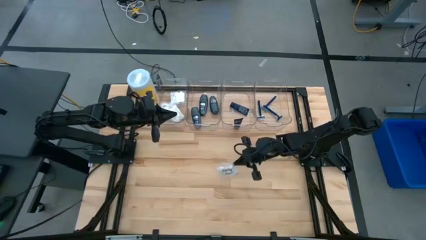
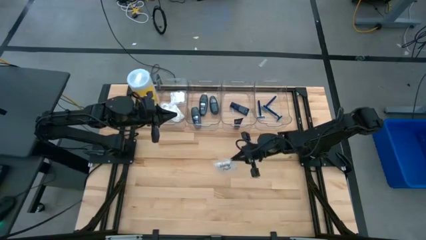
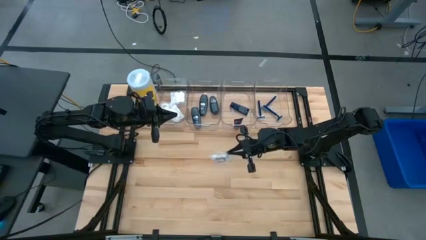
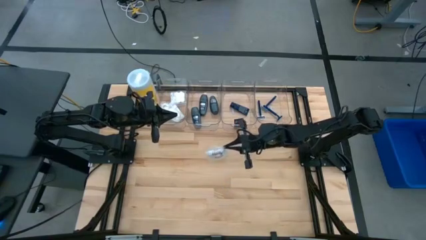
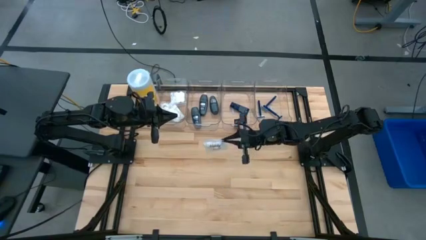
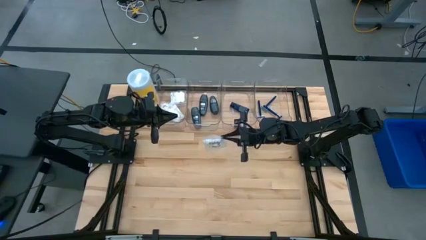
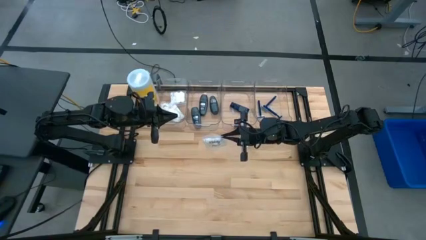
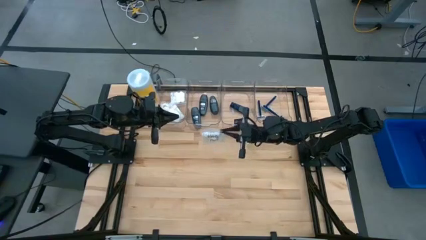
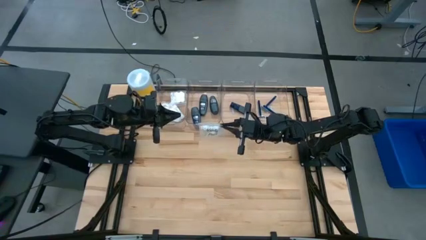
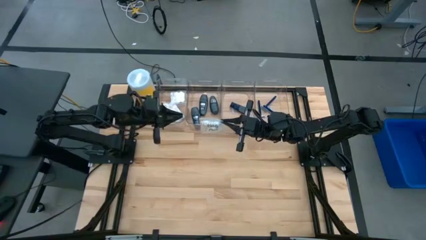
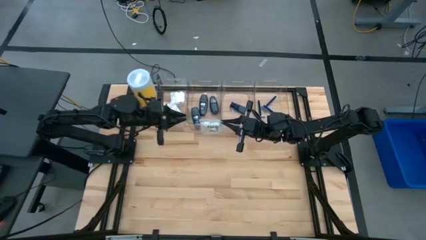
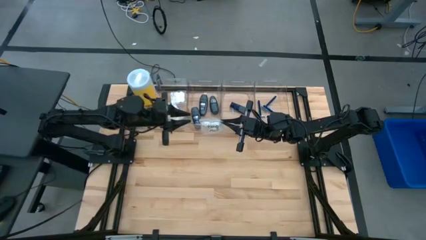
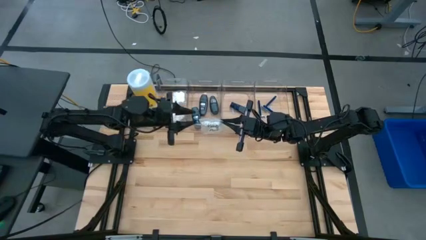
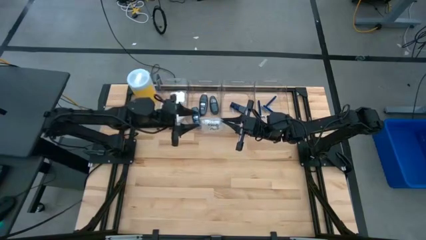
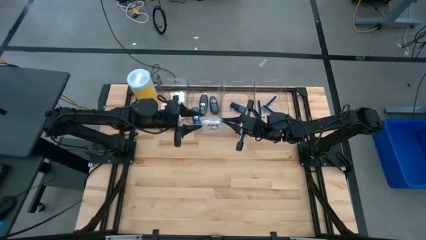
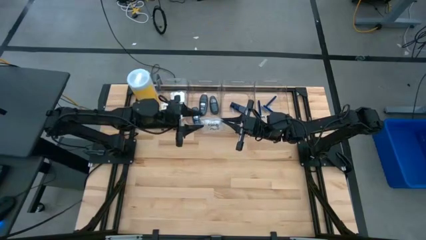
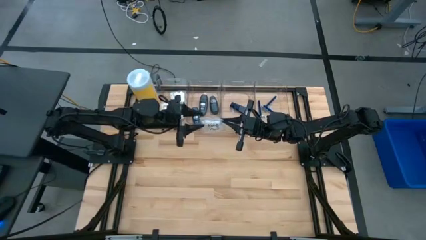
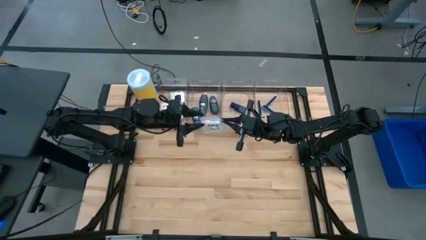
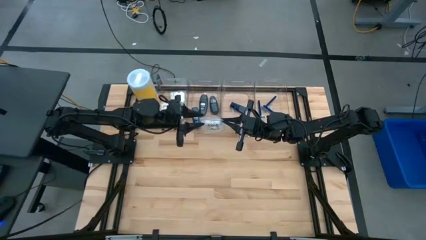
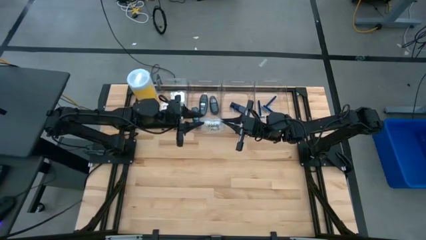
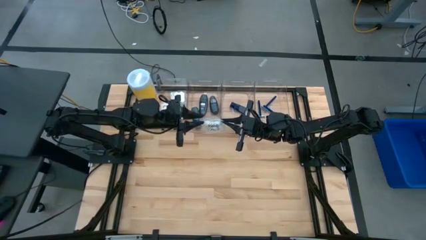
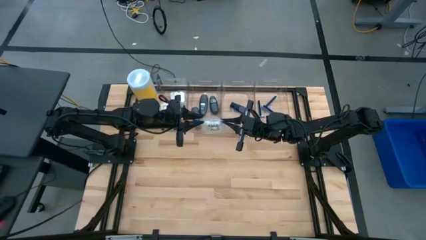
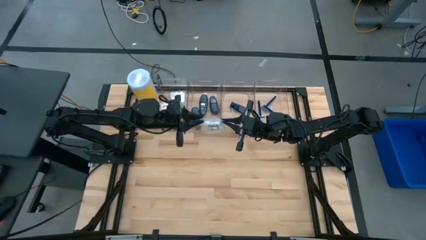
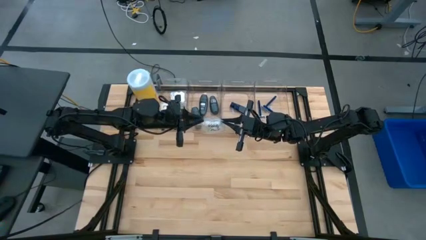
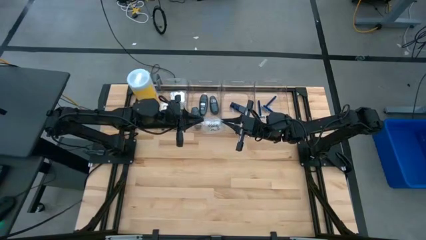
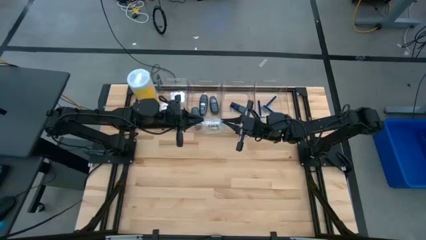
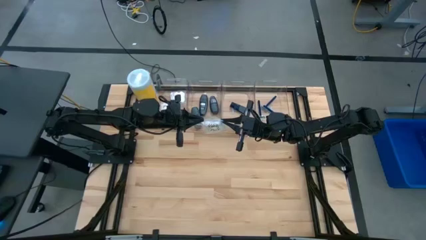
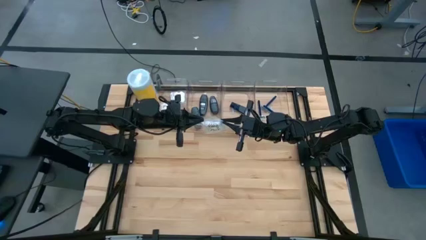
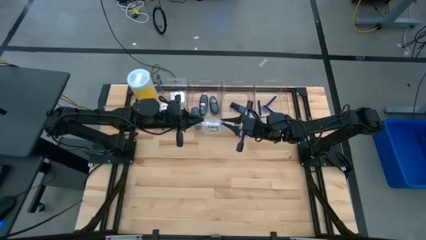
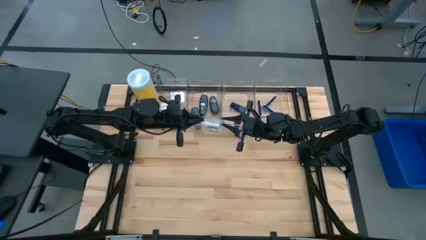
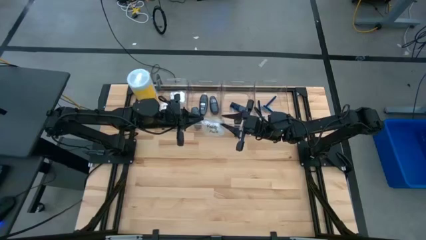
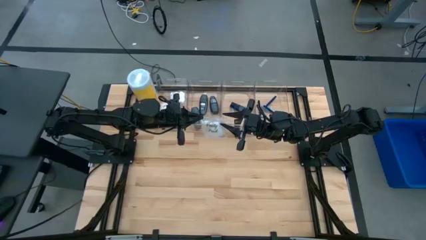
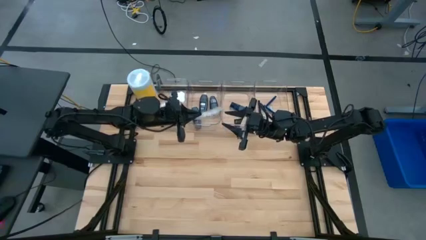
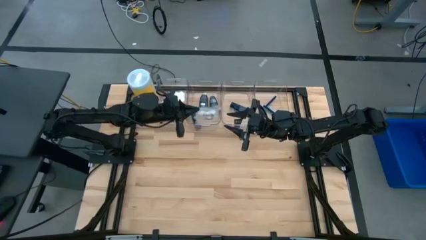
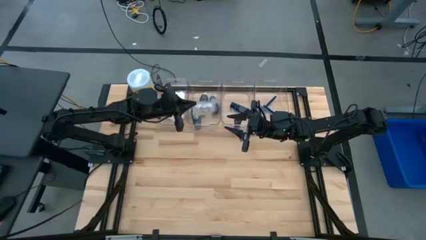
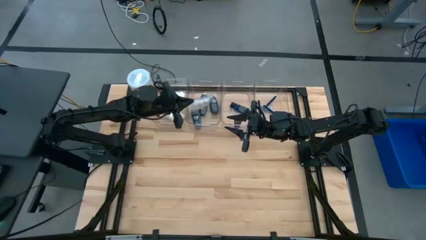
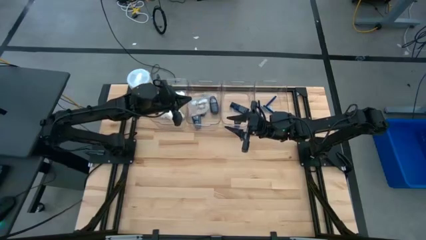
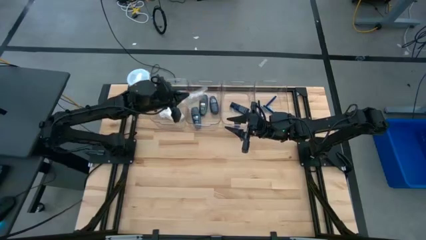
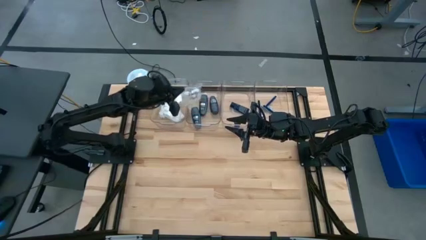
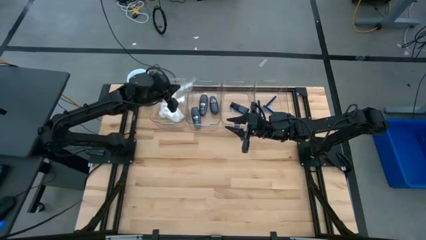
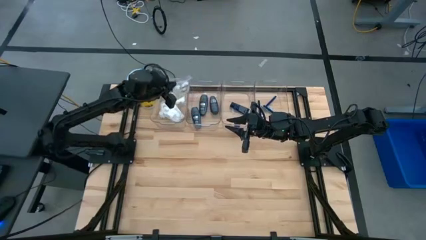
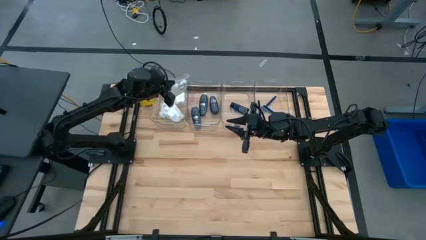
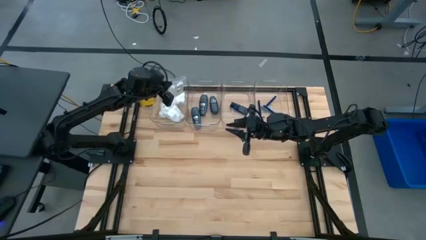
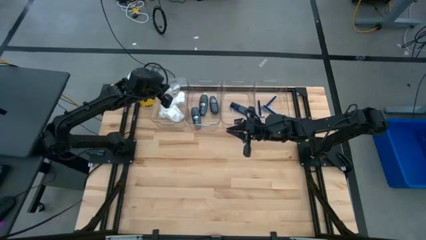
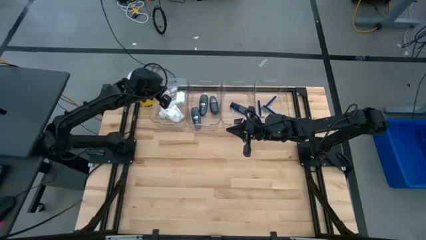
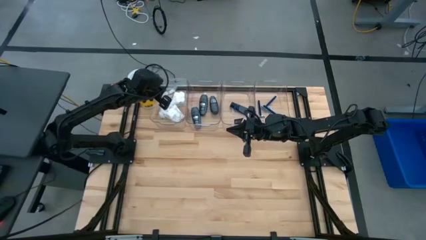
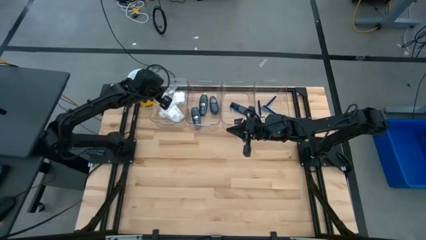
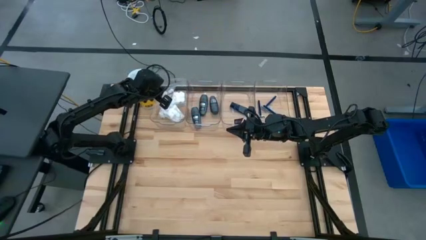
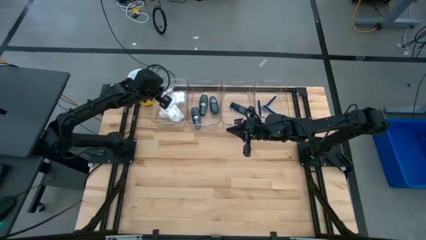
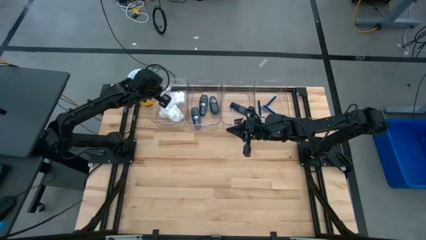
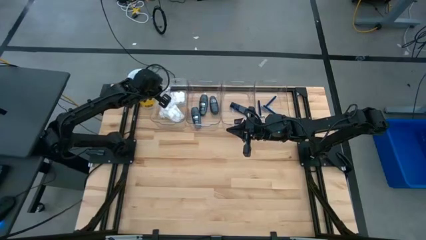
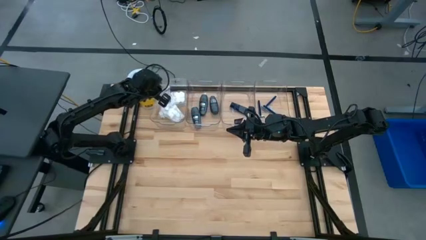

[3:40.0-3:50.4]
Task: Pick & Place Travel size toiletries
Put the white cotton pack into the left transparent bin

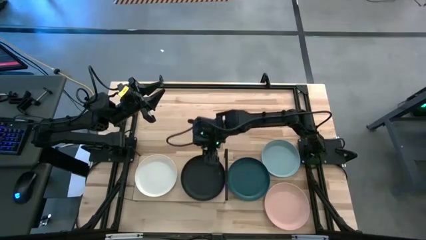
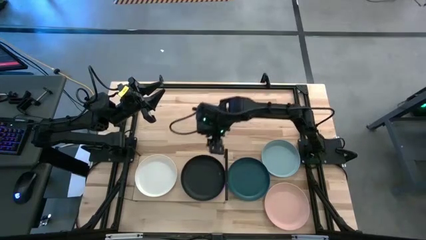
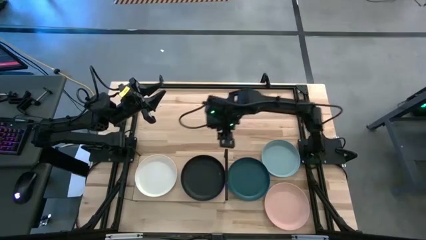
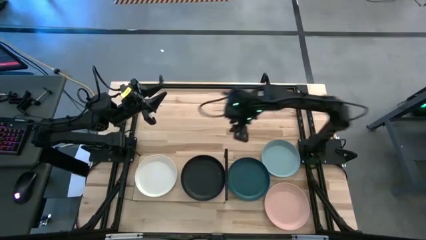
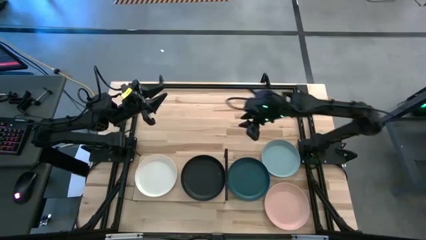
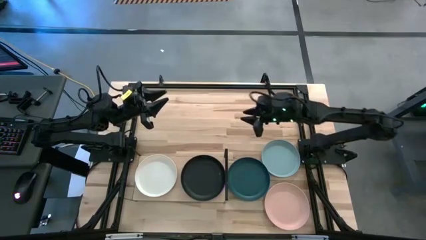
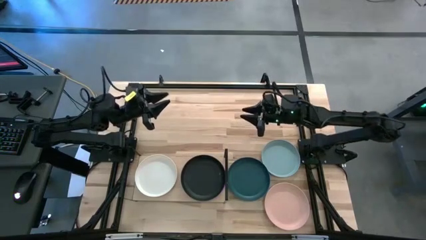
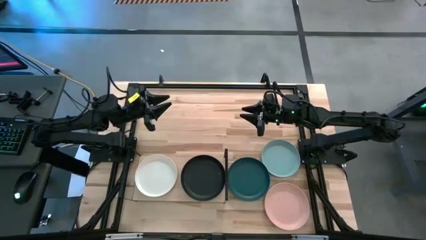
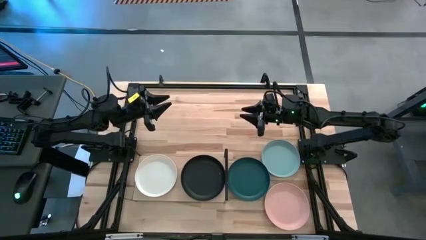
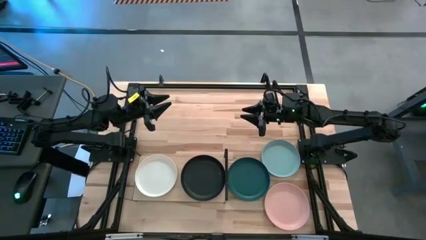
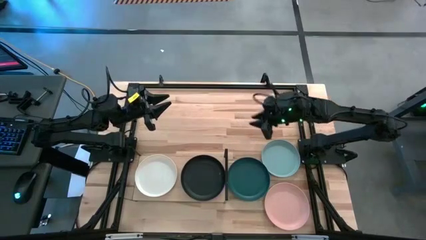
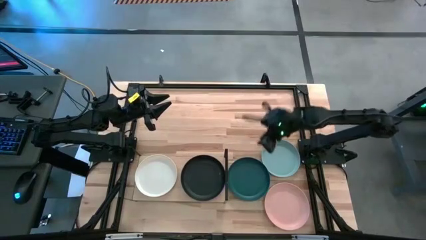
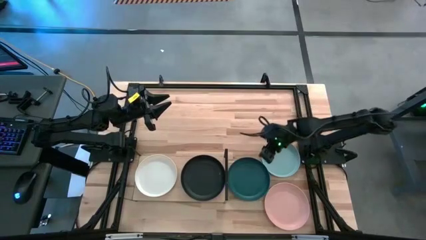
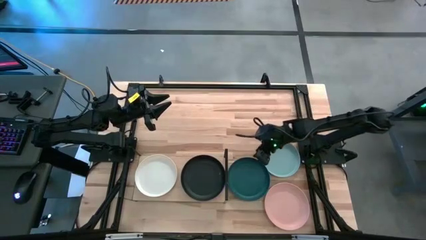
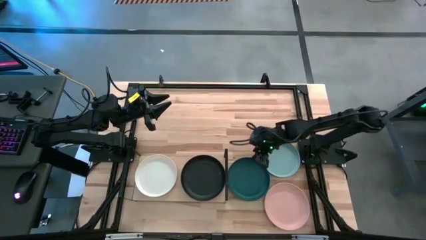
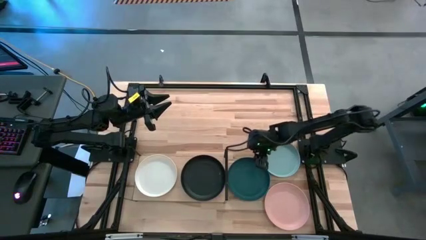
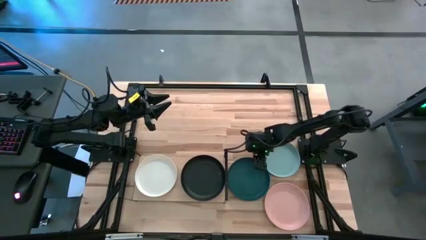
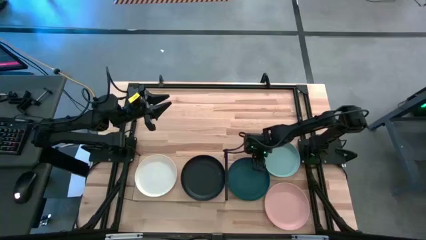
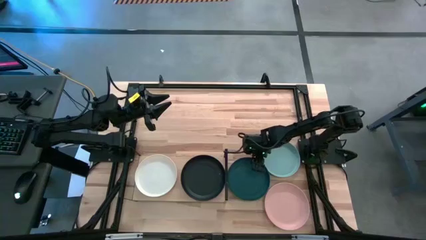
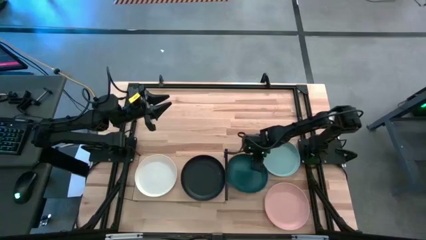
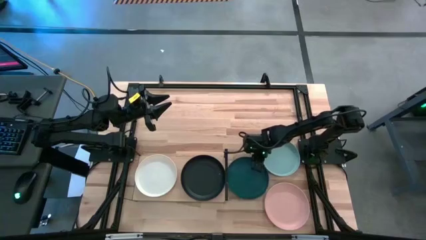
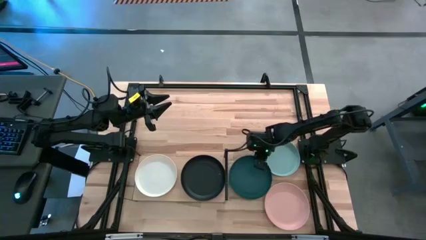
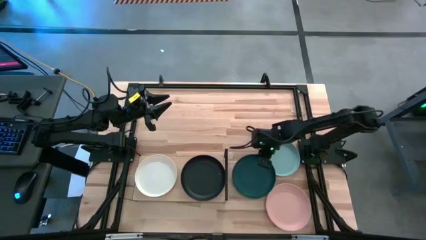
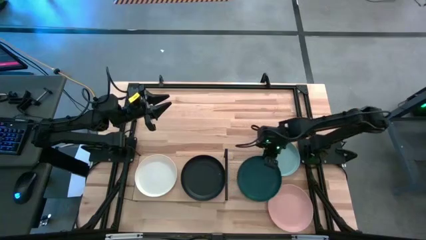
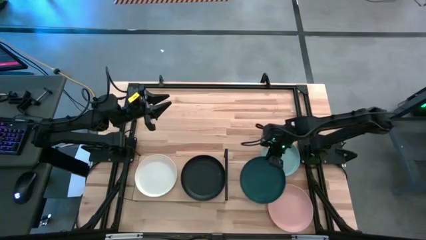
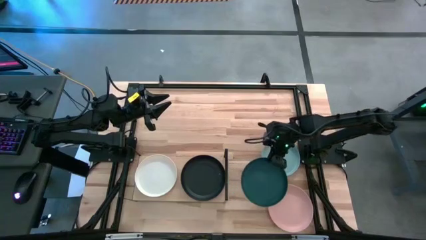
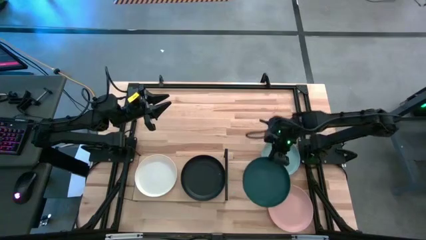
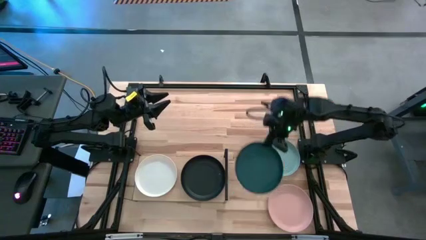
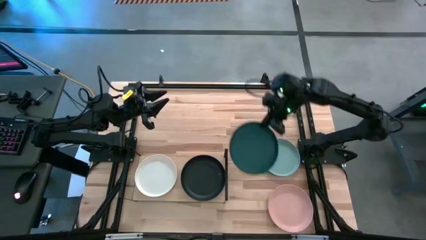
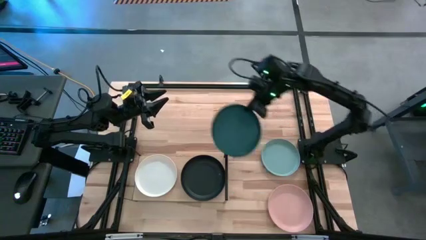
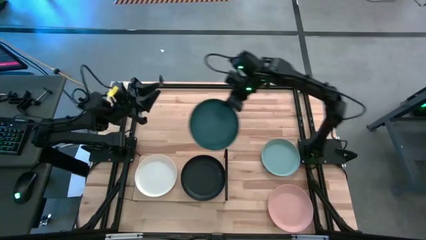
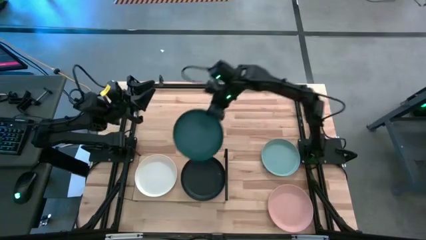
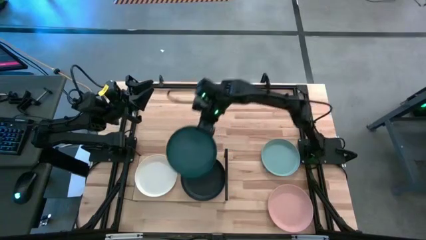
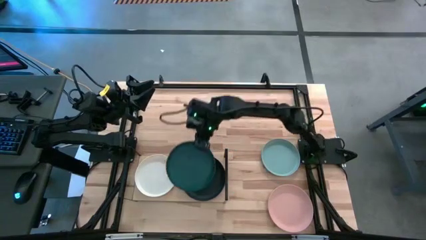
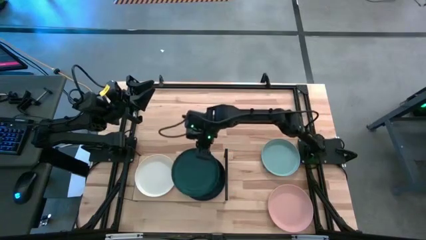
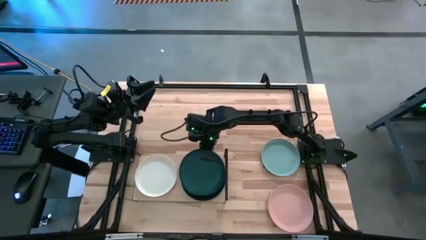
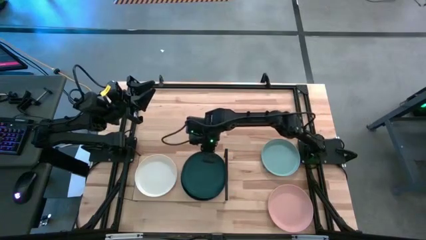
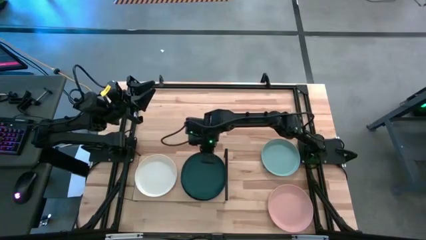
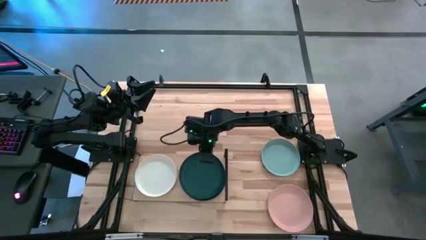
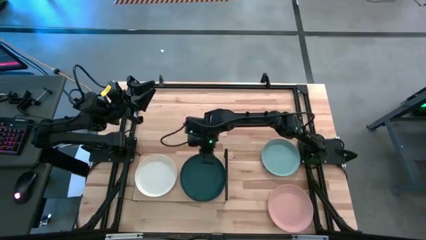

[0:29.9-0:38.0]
Task: Place and stack plates onto a shelf
Stack the dark green plate on top of the black plate on the shelf
